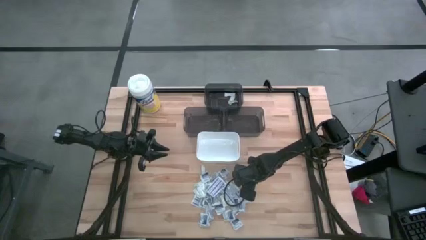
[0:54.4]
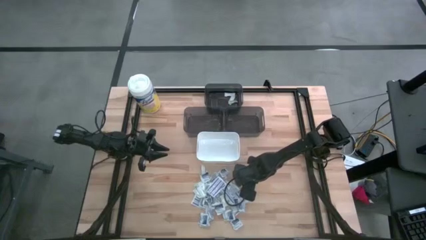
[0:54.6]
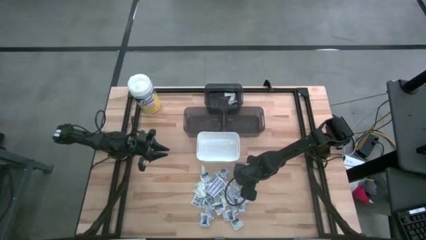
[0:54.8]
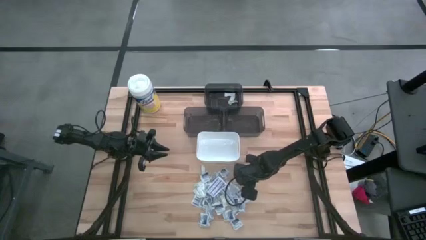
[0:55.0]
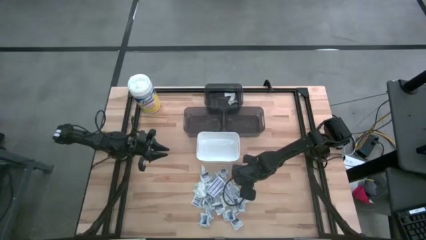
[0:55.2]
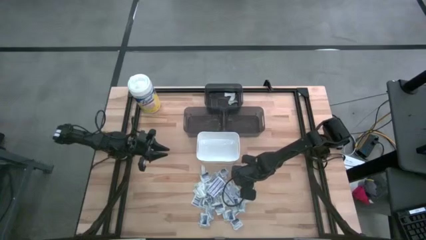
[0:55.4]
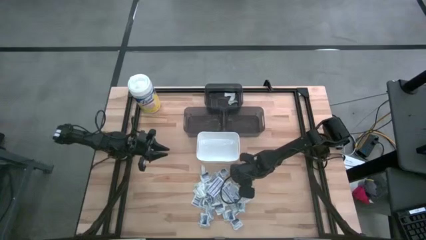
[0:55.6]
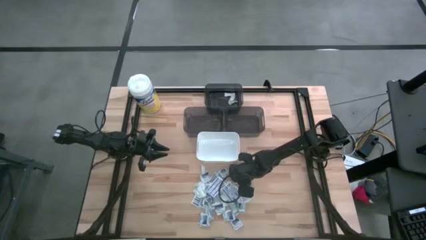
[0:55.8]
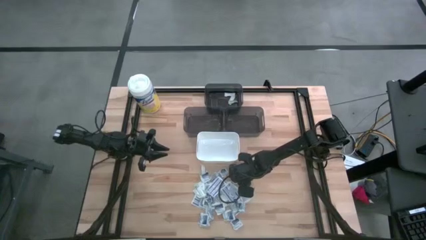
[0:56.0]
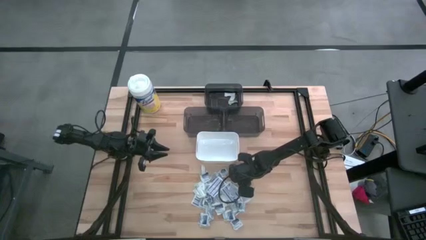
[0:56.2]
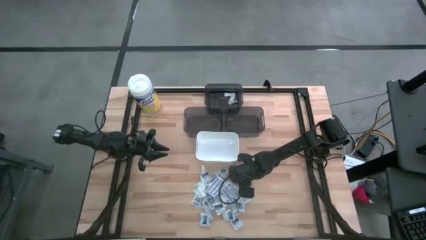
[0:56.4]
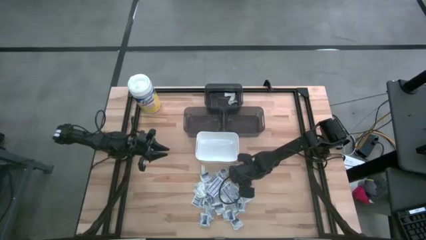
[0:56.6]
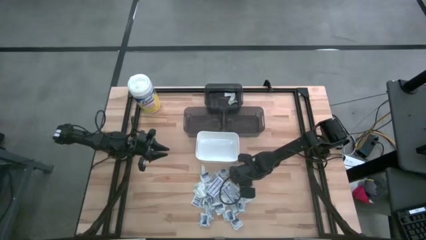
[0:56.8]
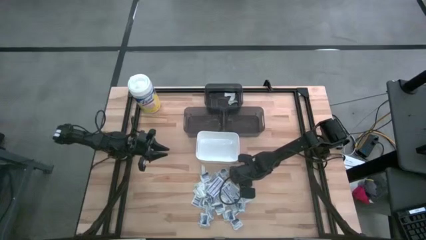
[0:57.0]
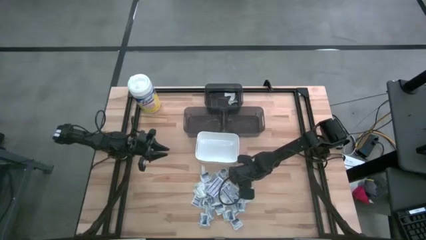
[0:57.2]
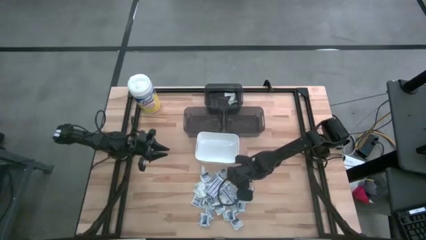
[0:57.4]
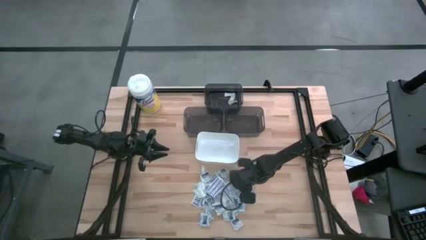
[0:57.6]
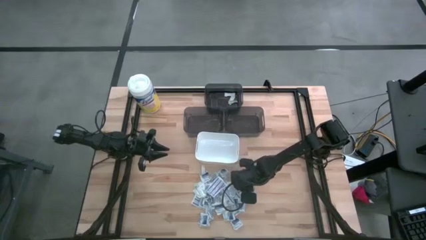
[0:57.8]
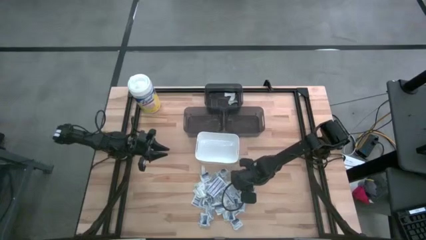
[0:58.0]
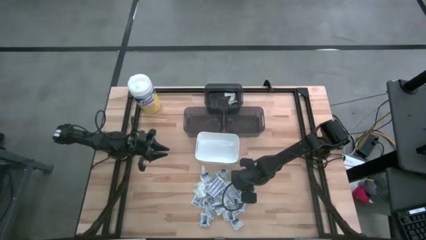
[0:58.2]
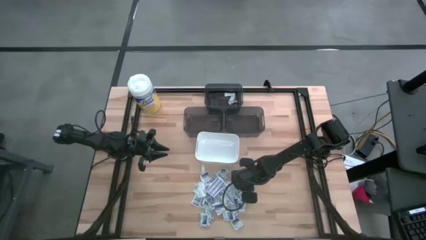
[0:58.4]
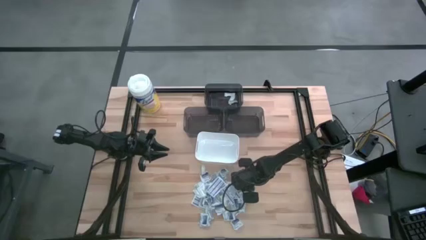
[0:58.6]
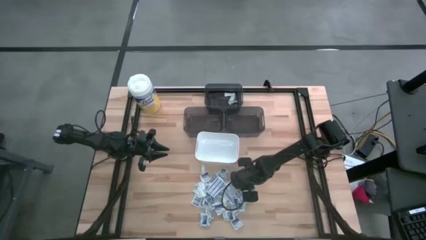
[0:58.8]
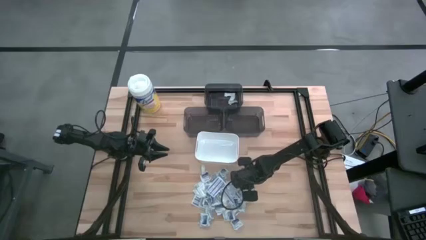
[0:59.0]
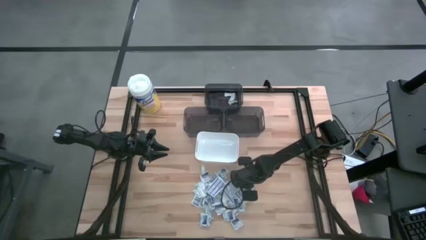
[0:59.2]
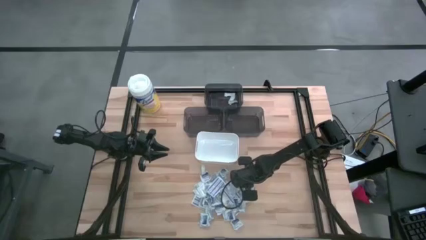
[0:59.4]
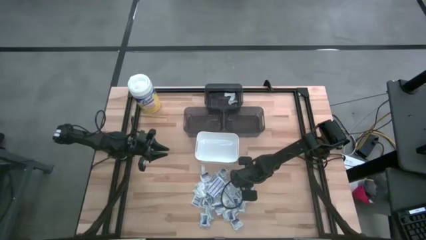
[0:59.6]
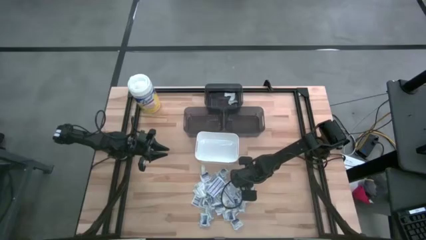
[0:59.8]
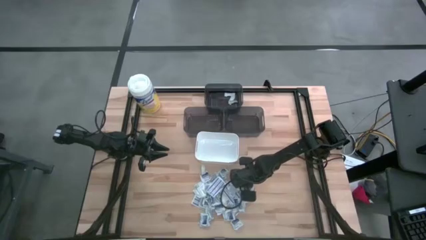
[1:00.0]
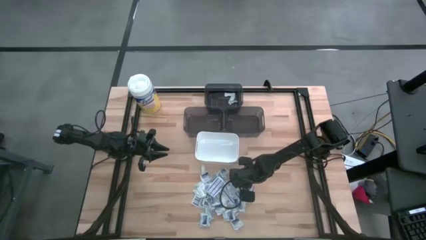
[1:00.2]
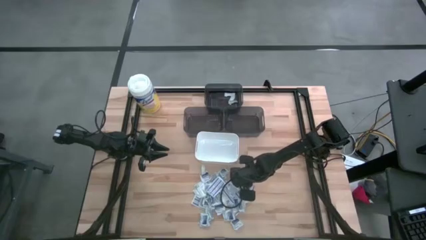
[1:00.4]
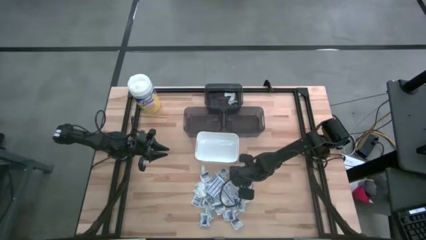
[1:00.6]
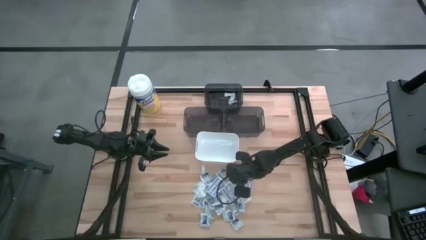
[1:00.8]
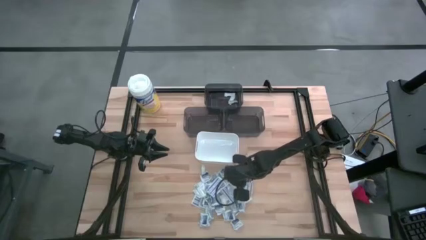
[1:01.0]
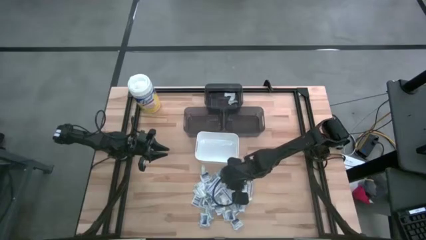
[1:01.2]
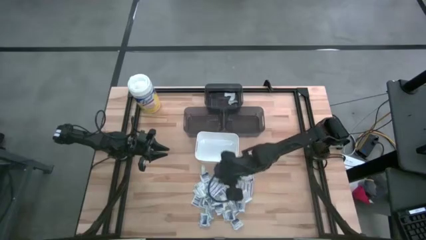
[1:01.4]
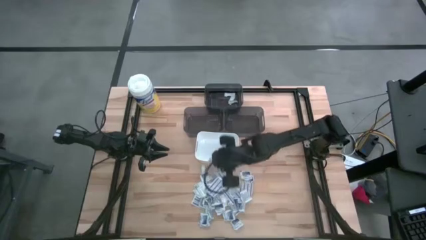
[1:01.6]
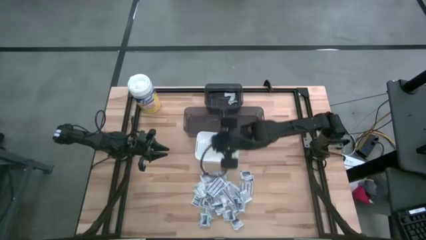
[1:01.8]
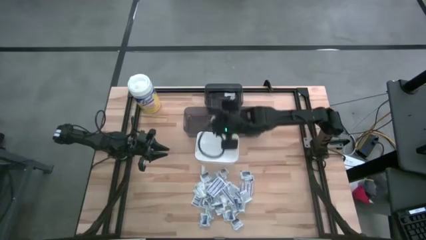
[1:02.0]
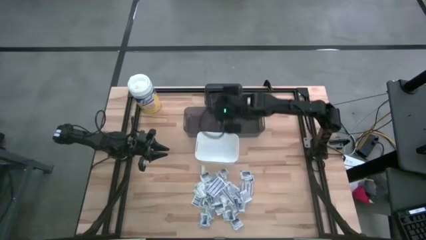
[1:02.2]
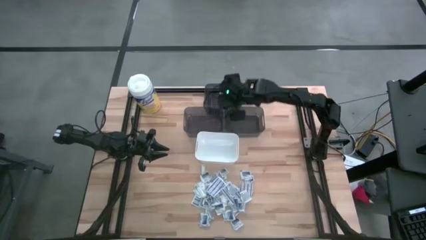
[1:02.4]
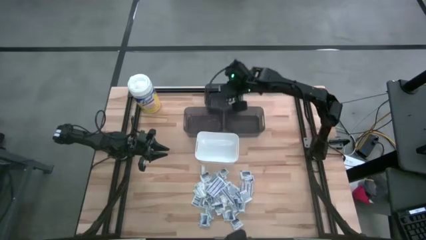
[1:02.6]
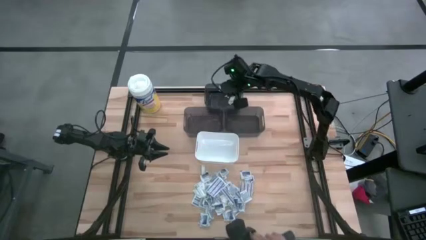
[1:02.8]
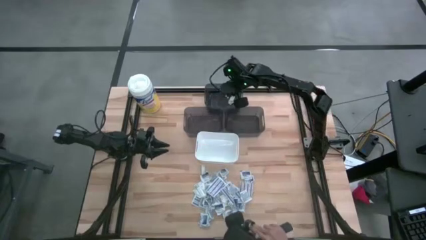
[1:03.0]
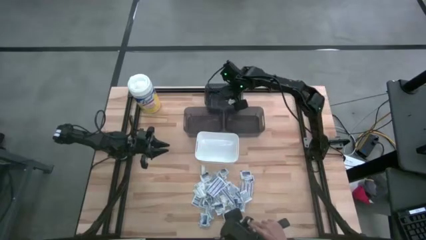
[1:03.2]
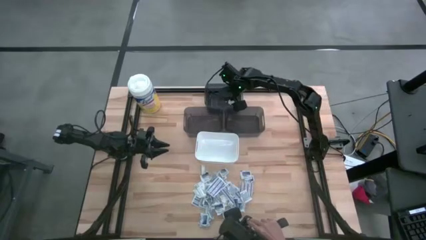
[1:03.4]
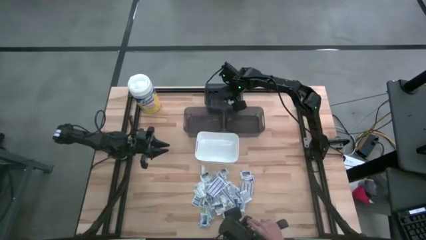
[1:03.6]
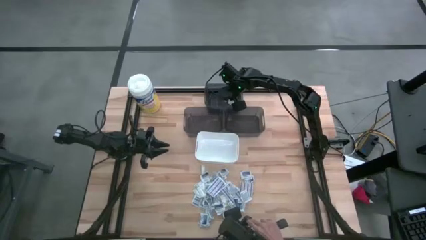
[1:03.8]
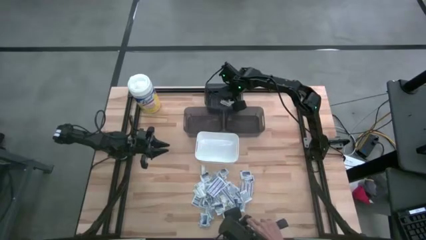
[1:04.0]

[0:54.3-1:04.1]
Task: Pick & Place First Aid Supplies
Put the green bandage into the top black bin

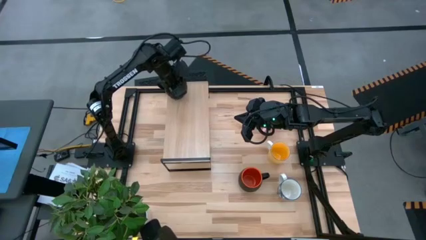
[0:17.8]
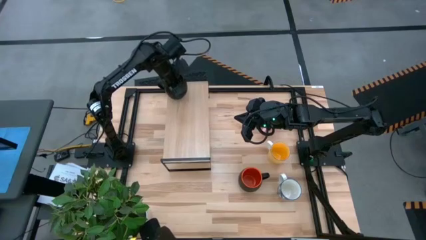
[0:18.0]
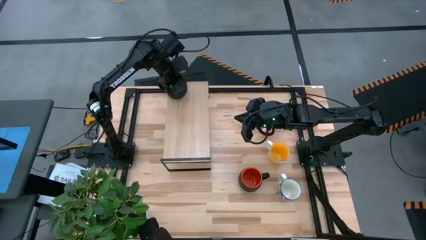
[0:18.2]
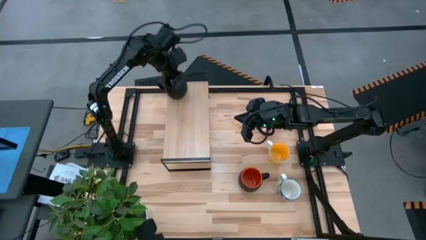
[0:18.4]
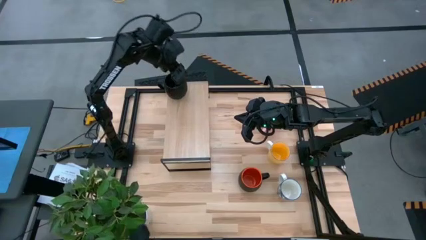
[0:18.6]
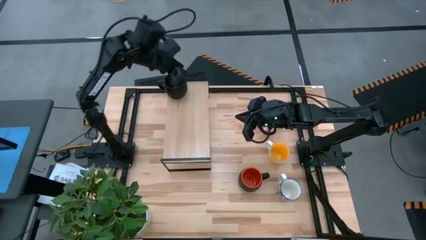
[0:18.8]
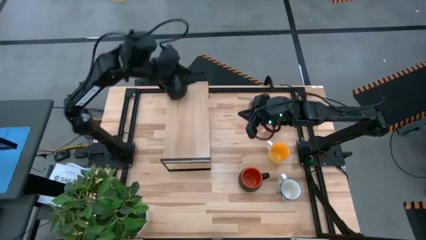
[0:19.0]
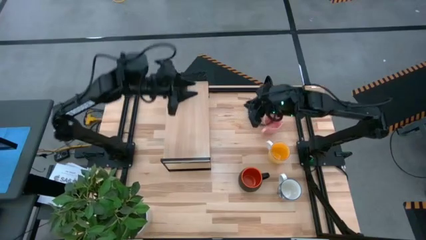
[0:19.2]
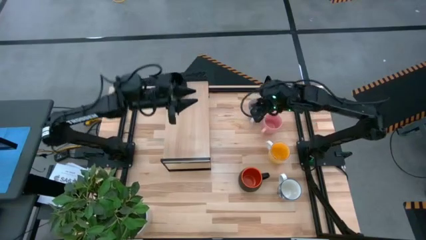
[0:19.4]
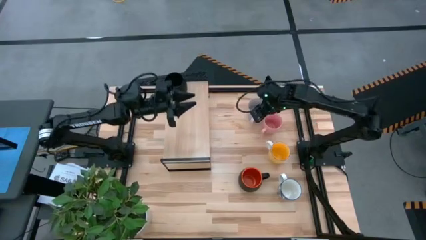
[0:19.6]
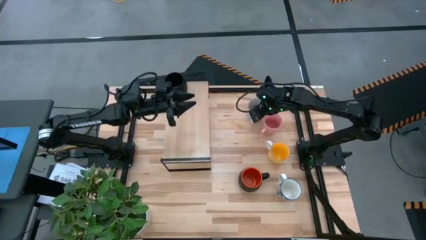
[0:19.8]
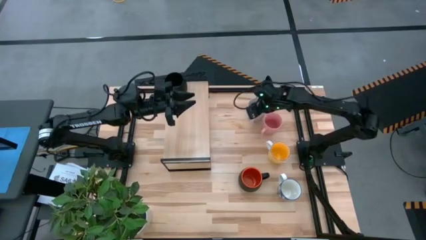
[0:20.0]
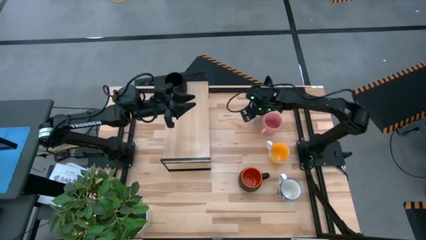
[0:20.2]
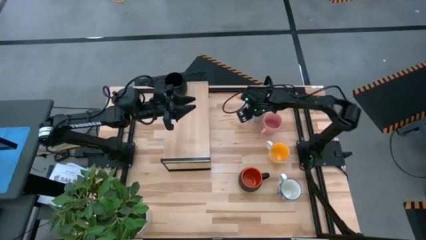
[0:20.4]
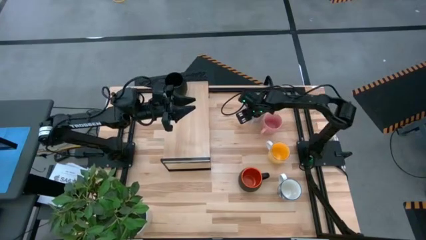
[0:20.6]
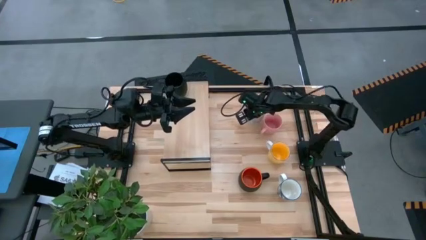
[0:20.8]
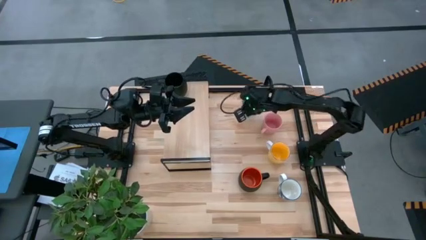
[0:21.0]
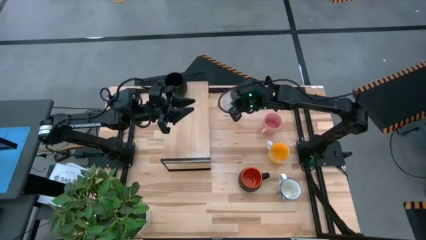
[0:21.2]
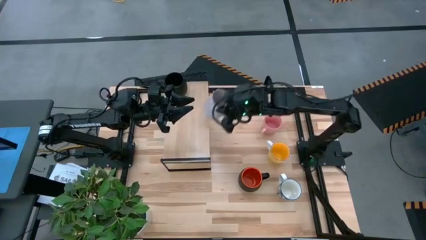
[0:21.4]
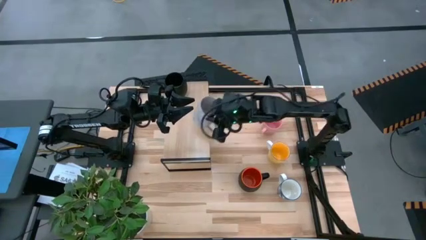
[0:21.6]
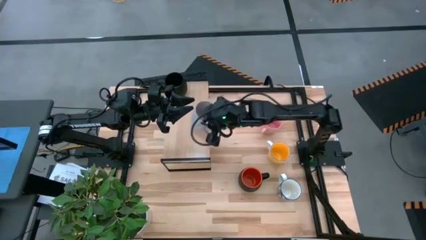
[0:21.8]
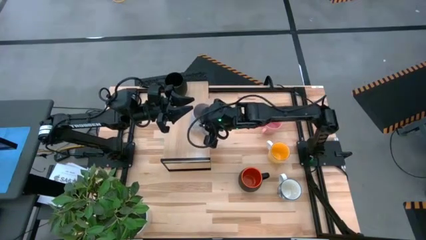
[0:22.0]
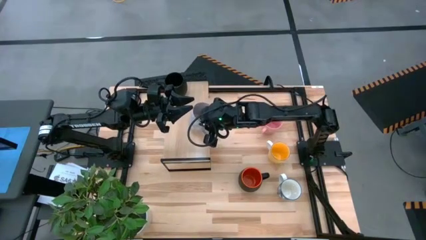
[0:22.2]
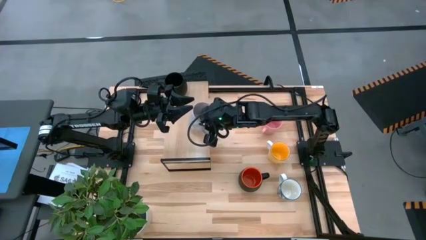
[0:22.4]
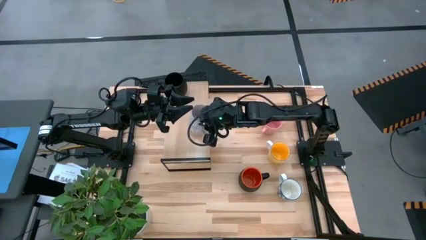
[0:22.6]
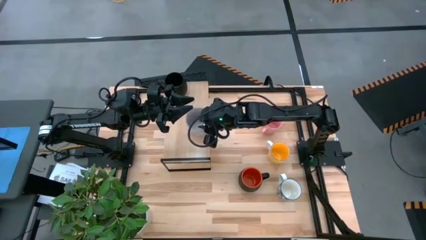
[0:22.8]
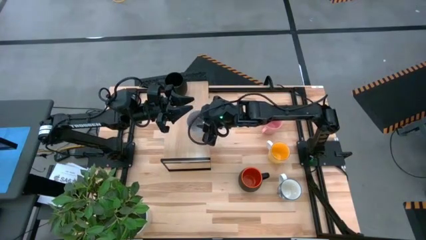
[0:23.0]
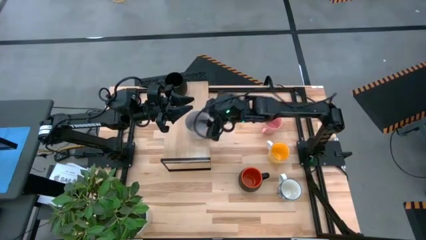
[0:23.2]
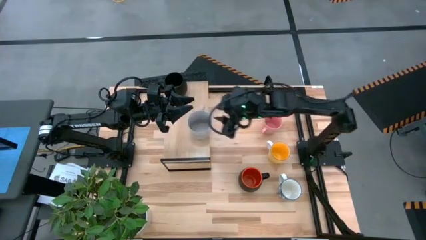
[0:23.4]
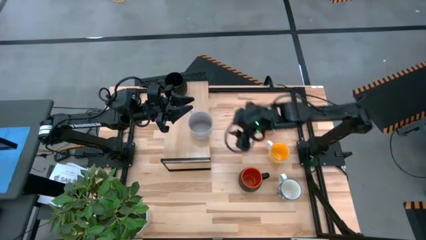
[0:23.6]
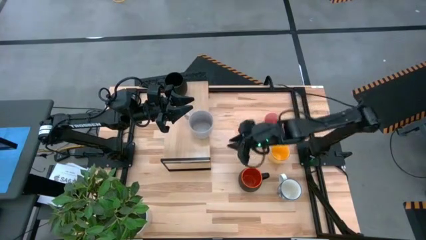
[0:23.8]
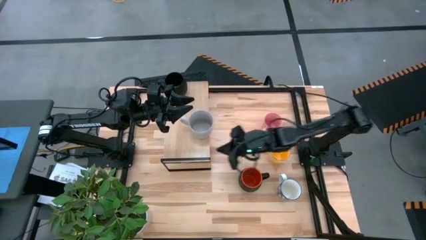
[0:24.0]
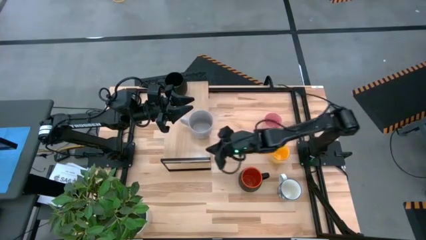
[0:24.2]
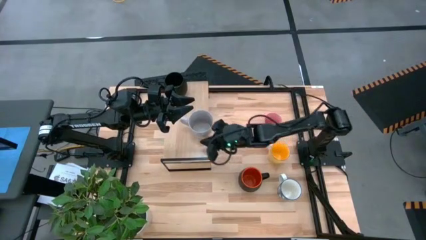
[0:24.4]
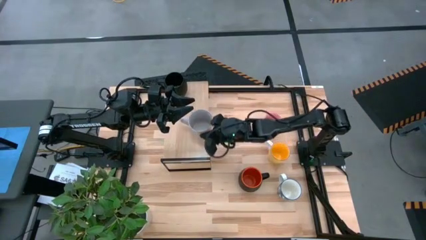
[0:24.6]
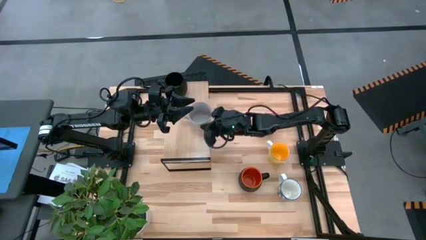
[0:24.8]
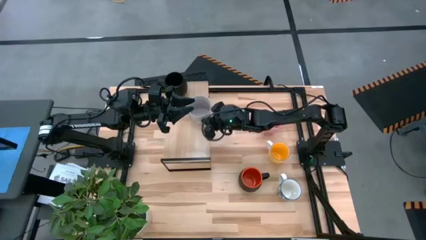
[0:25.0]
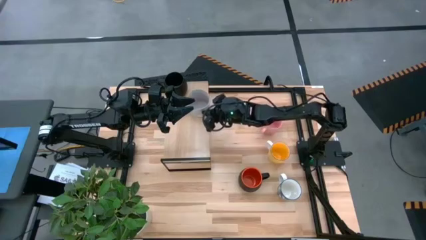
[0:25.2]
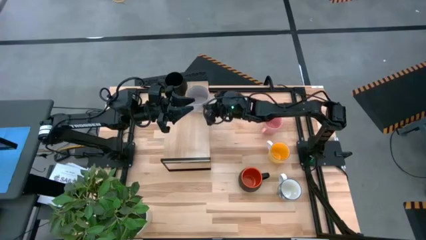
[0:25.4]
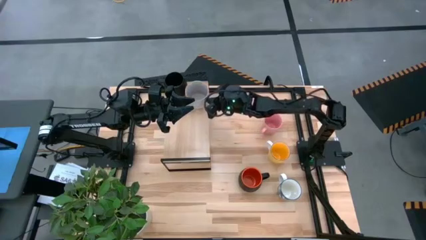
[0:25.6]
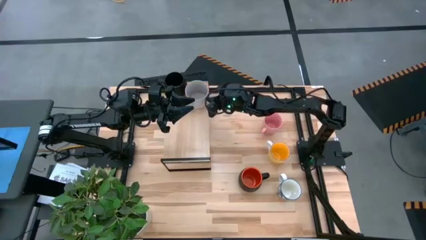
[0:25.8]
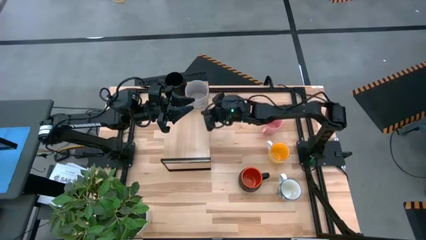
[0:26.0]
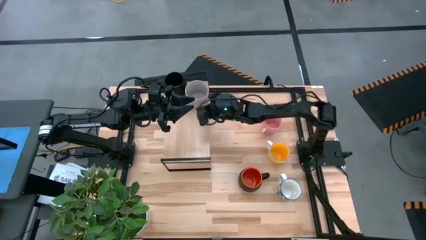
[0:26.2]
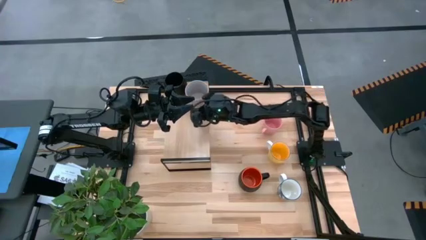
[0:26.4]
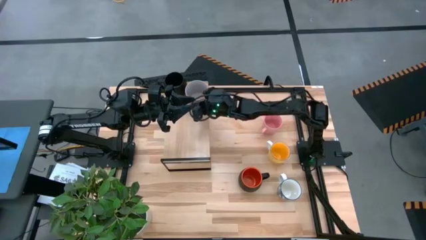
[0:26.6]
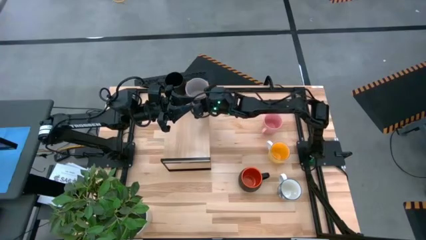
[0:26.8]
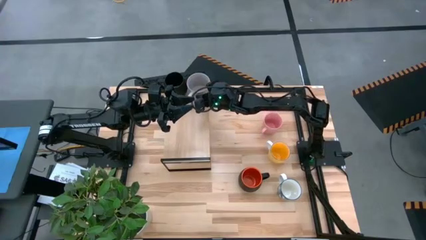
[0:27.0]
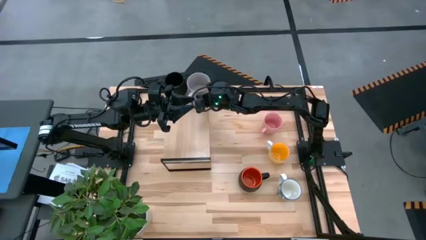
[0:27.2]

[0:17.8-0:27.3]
Task: Place coffee mugs
Put the gray mug on the shelf
